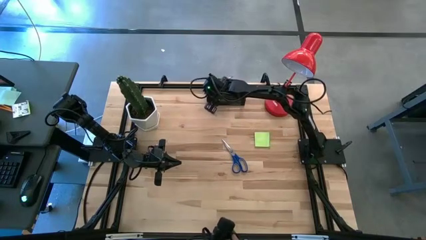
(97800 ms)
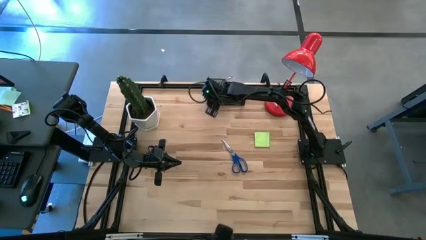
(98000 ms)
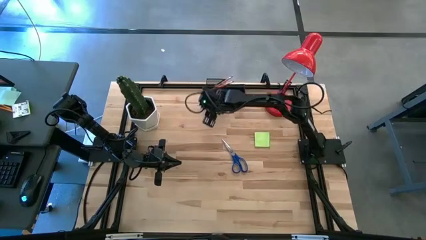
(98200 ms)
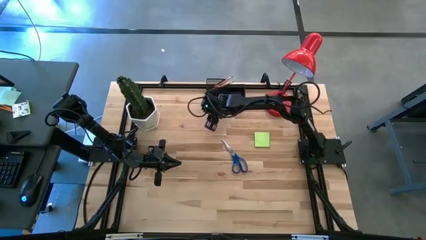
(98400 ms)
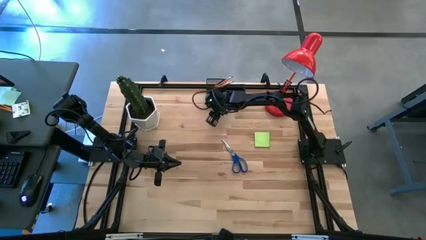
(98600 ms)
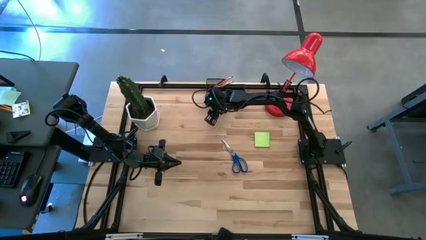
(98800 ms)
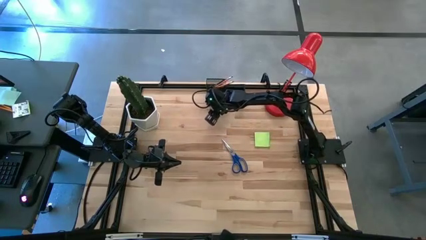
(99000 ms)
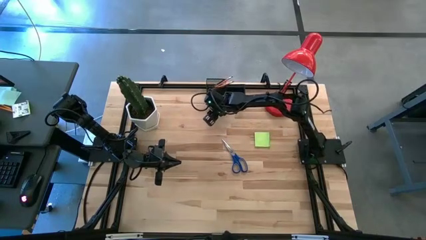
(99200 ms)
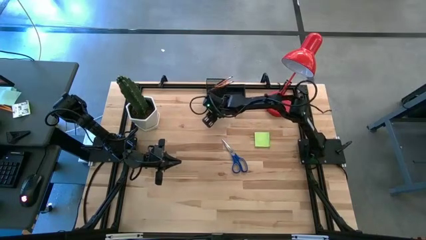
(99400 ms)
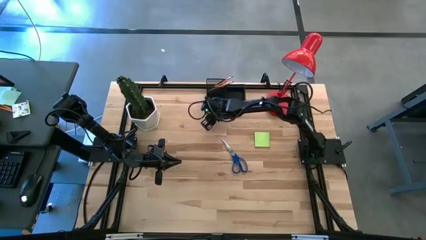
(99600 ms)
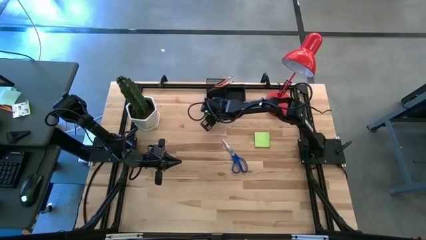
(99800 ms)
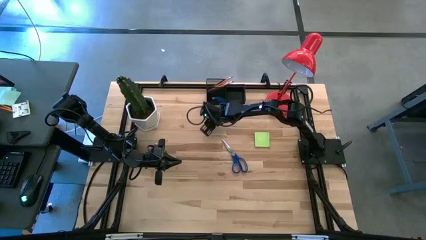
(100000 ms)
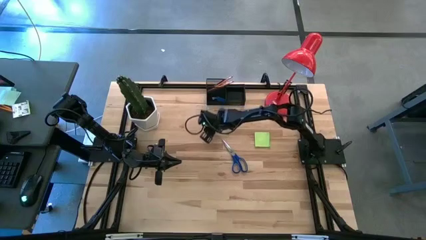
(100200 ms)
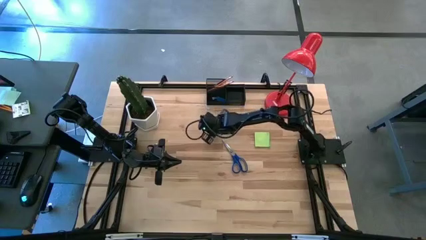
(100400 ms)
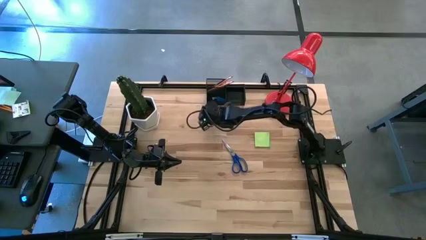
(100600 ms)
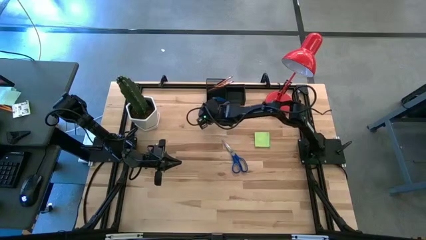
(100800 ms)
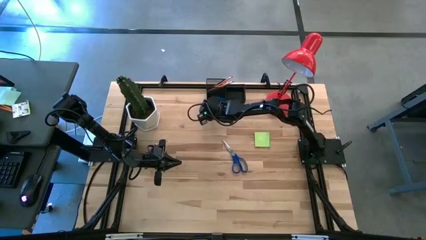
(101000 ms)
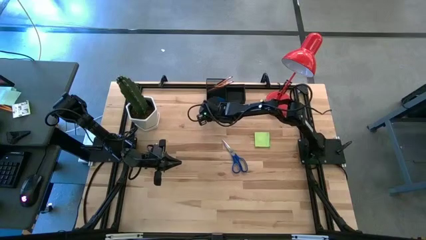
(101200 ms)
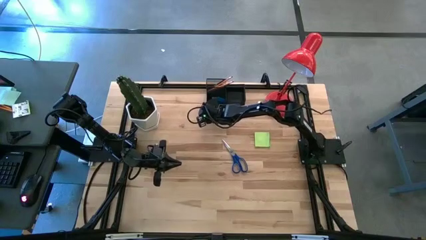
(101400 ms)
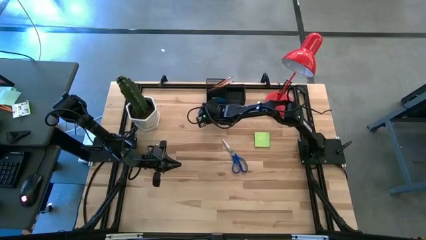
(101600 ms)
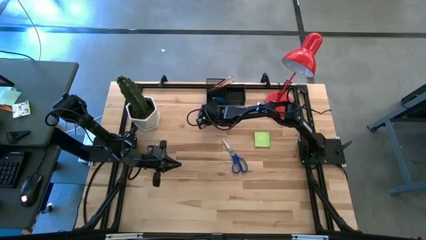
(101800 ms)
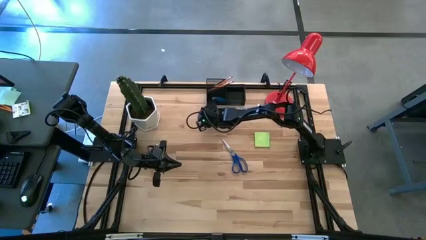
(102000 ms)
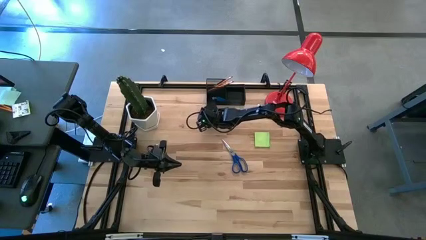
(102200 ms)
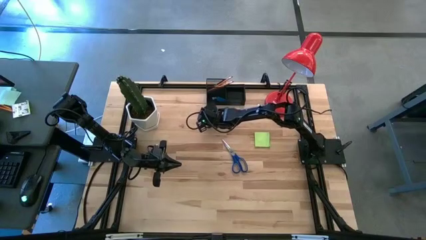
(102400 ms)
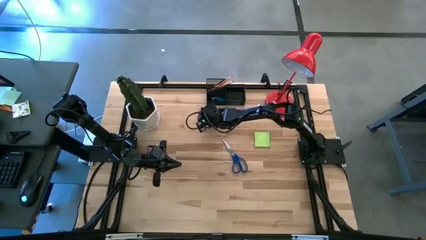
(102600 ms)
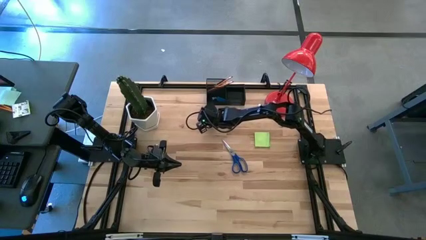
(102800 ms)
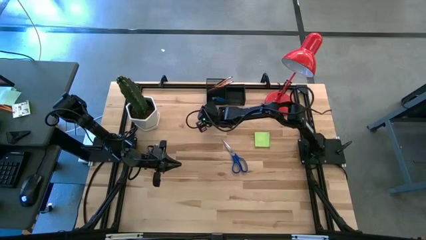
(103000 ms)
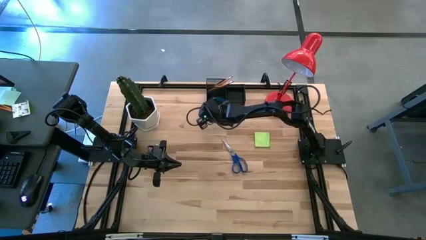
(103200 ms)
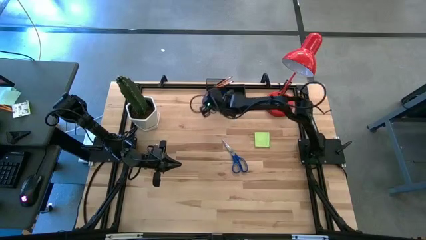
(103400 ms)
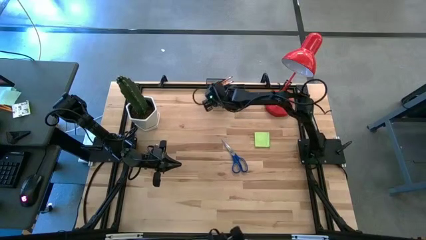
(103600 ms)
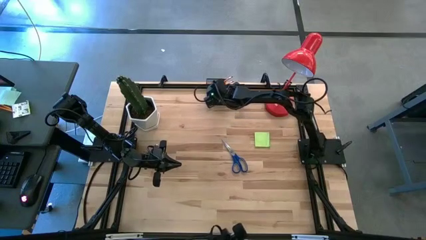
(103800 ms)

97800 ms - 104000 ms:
Task: Pick and place office supplies into organizer
Put the blue binder clip into the bottom left section of the desk organizer

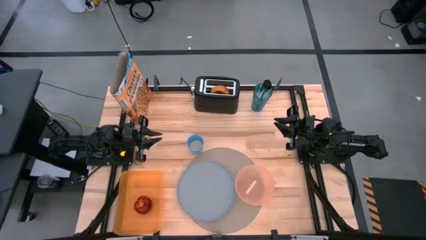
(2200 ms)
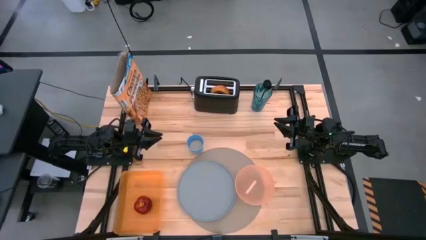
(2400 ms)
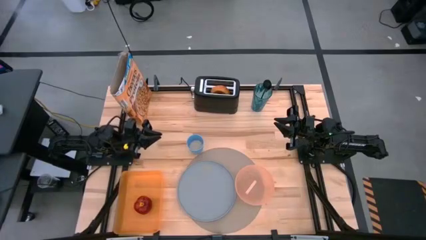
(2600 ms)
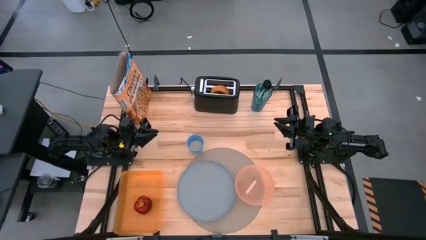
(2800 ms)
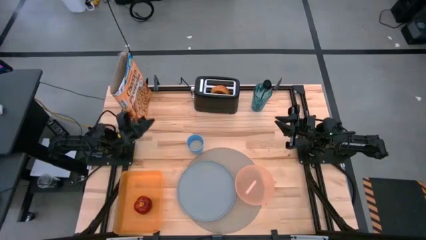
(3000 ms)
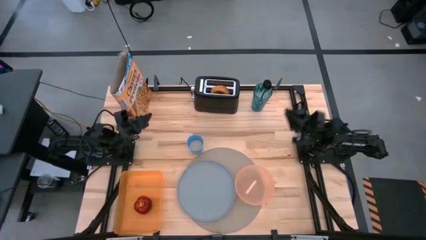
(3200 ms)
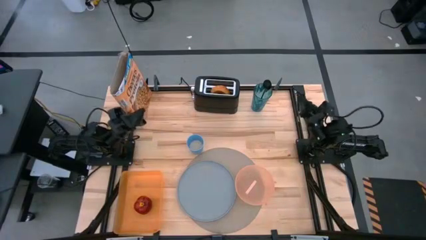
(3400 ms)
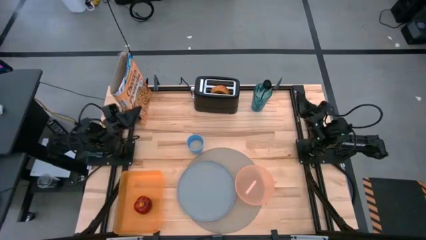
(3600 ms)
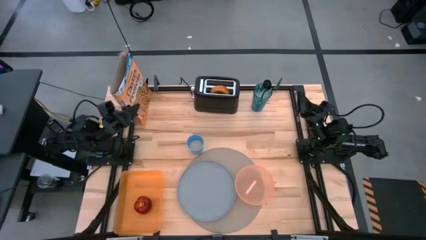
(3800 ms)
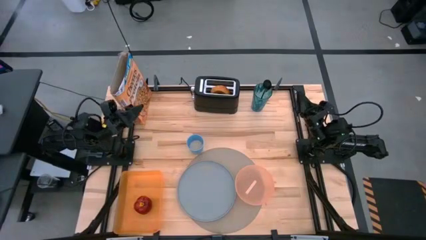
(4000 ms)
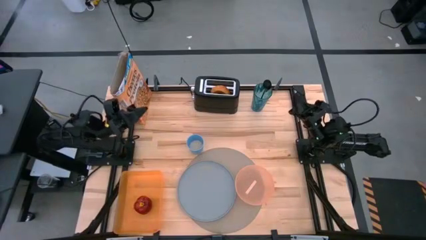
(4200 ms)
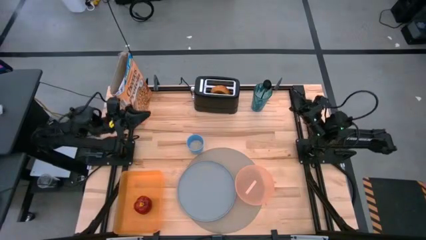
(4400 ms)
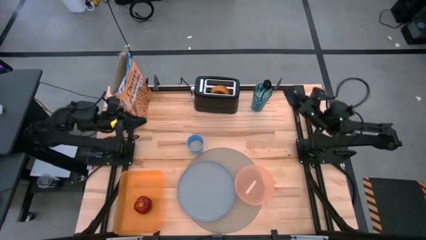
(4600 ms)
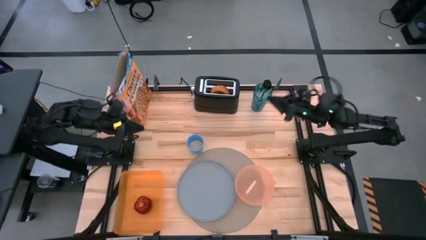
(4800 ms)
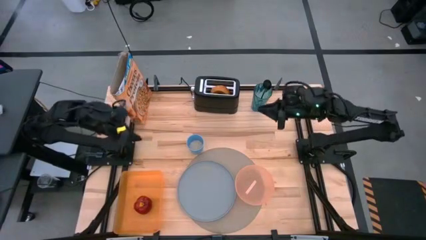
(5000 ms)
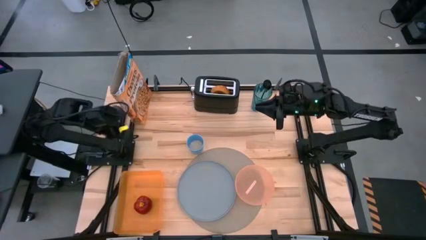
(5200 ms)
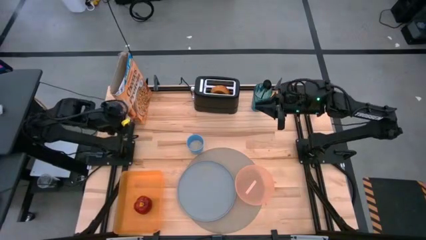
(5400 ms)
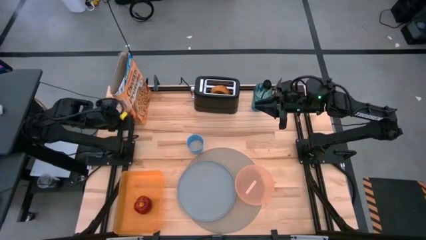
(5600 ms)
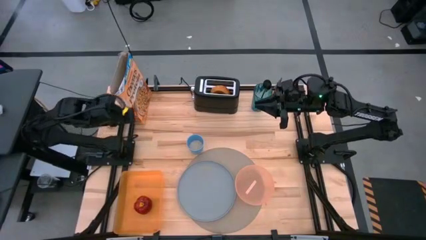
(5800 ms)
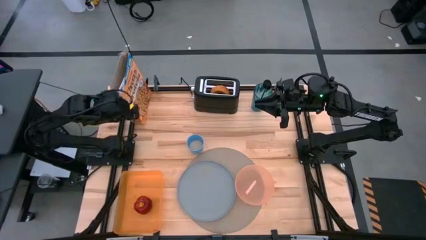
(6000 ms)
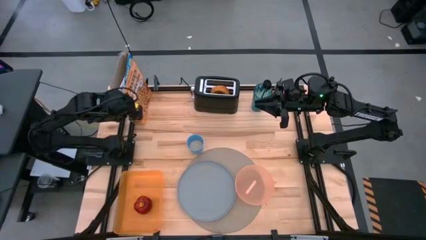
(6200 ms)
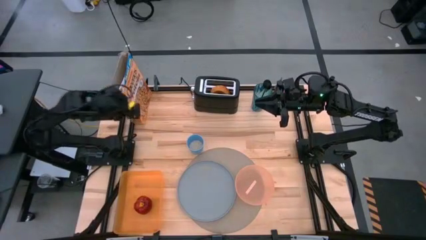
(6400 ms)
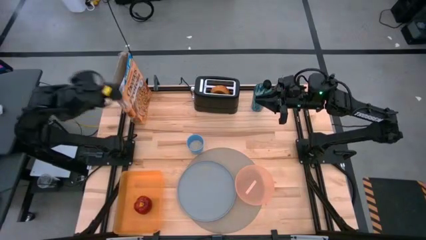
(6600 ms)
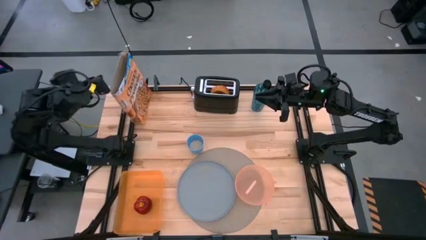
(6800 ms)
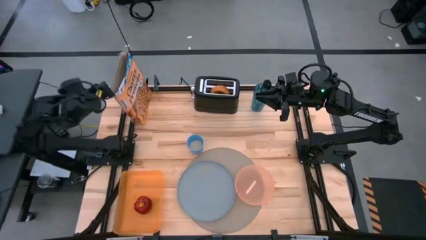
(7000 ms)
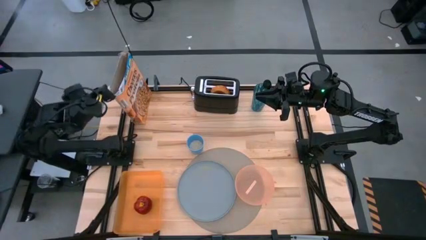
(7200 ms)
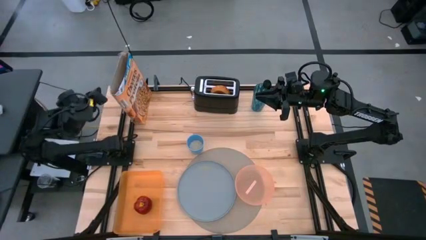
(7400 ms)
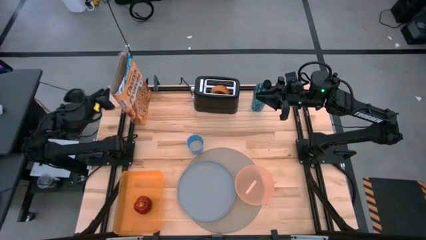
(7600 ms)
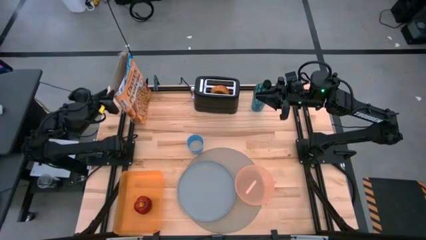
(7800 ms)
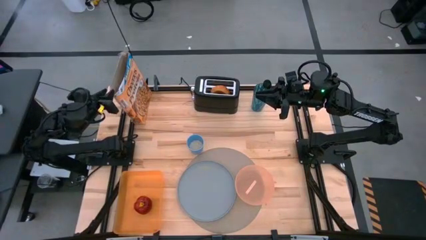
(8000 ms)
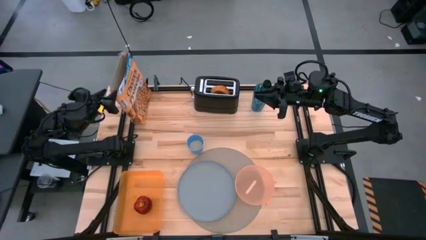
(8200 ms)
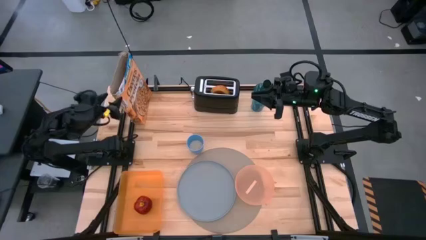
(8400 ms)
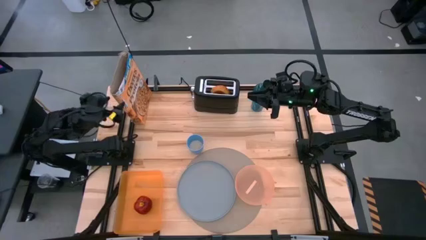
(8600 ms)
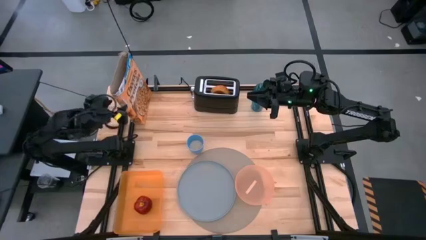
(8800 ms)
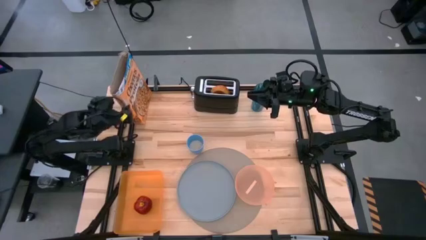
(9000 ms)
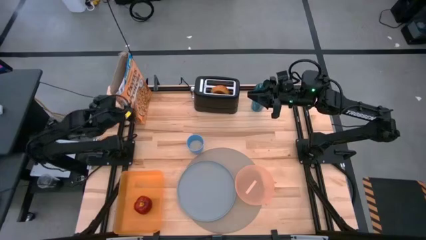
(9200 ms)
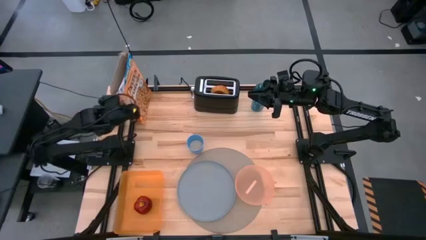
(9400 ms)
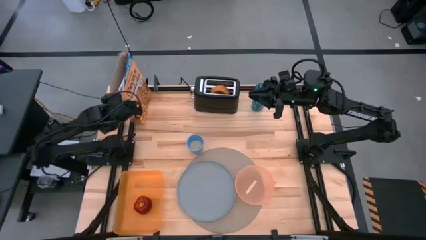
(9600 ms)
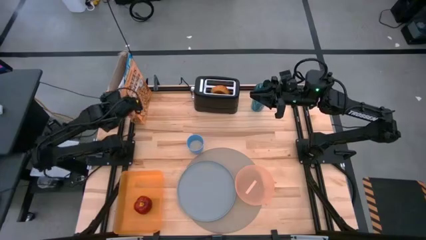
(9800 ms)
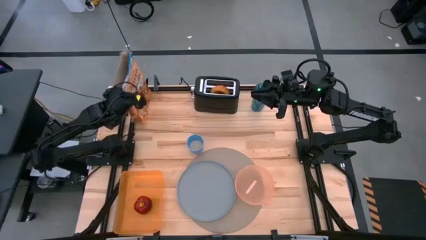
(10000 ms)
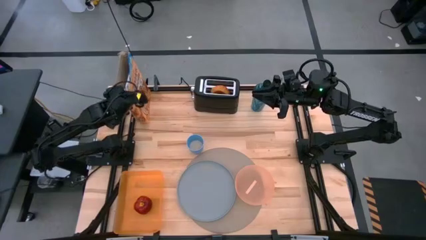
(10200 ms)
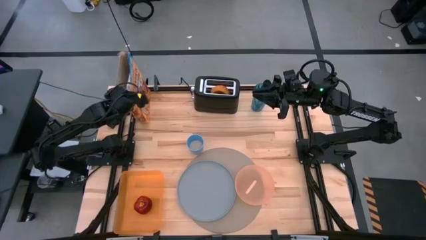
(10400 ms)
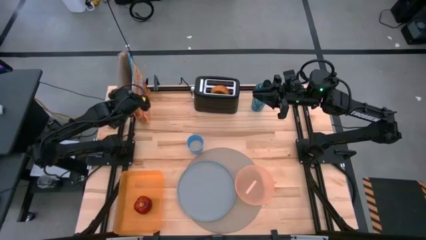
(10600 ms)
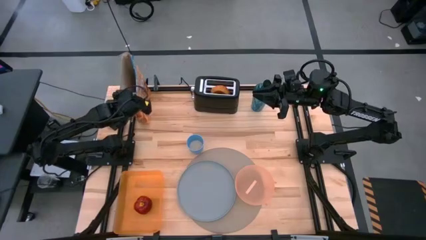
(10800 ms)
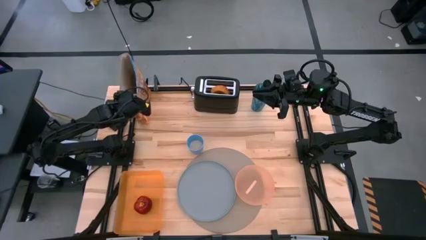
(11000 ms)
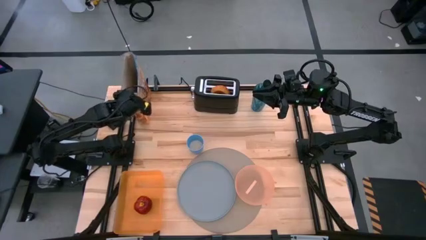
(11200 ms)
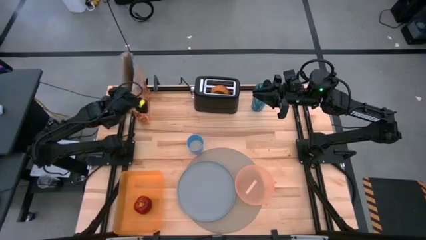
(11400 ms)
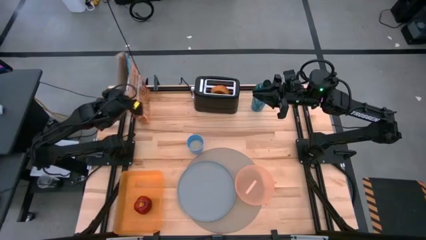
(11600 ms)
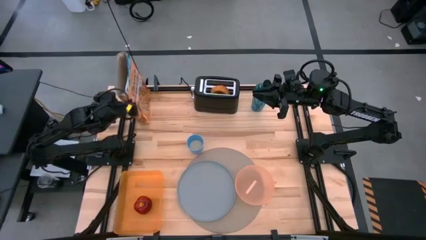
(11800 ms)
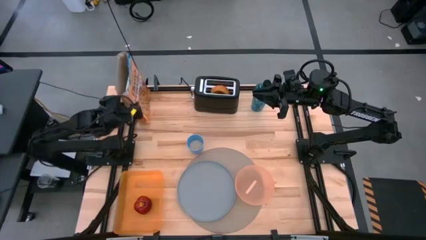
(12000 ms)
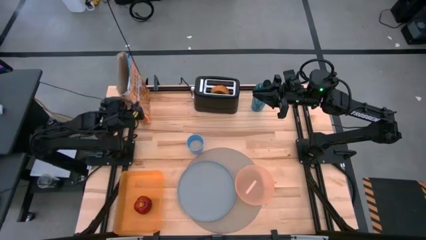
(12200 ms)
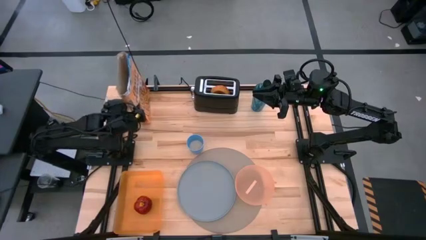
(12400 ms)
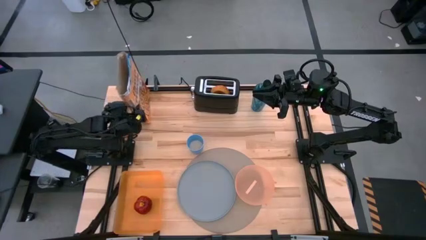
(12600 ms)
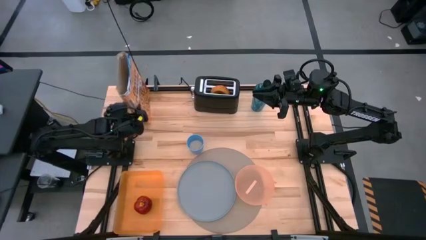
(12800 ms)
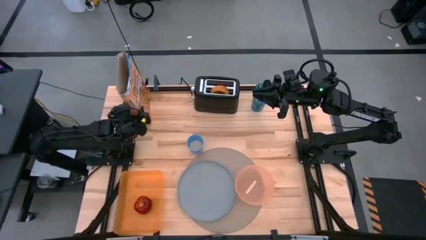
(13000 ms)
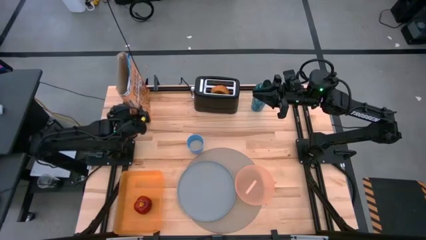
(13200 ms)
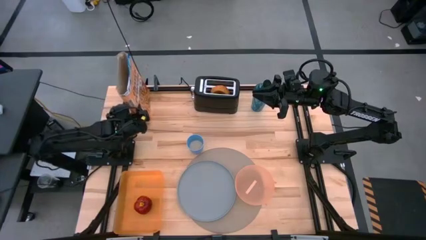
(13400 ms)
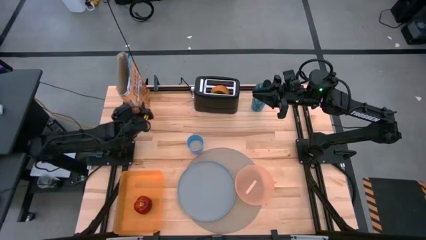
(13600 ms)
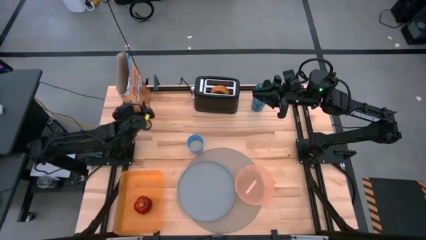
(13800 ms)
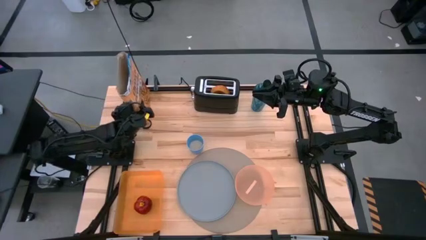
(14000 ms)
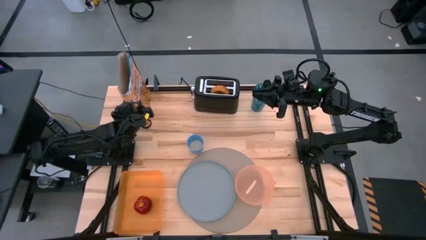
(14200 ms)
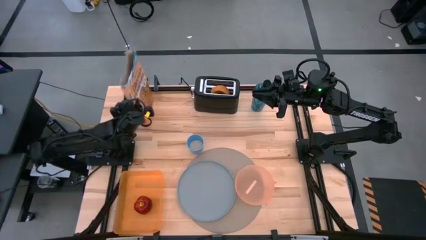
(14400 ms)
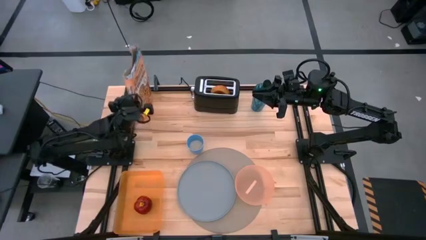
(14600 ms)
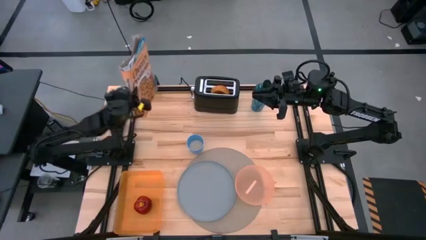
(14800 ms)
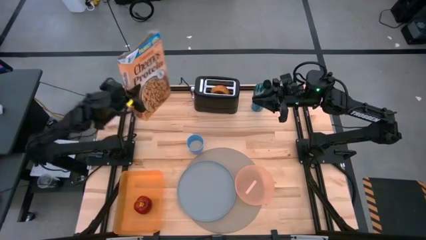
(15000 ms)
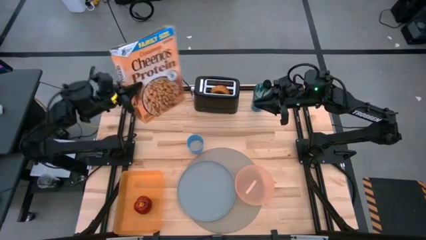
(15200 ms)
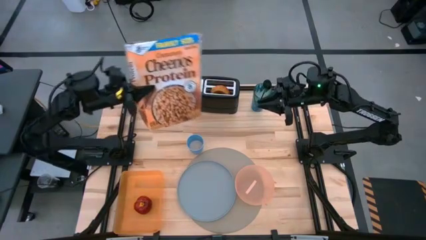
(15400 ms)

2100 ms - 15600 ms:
Task: Arrange a breakfast setting
Pour the cereal from the cereal box into the orange bowl
